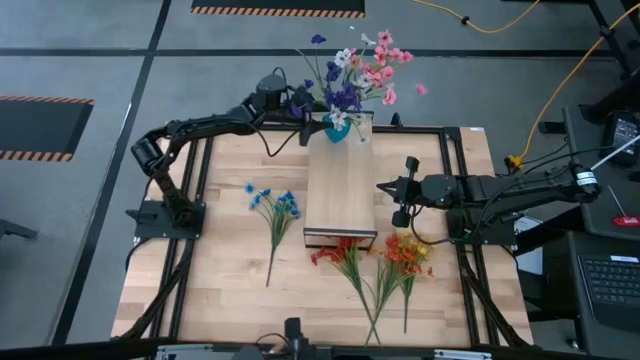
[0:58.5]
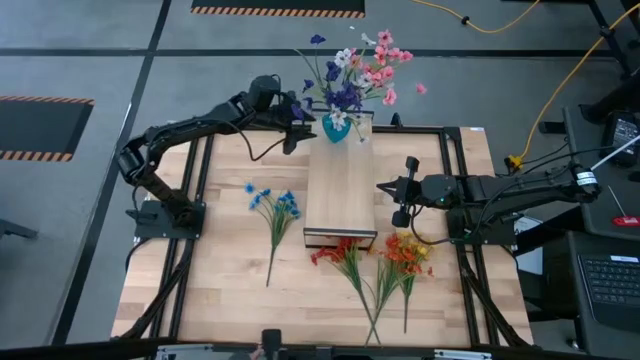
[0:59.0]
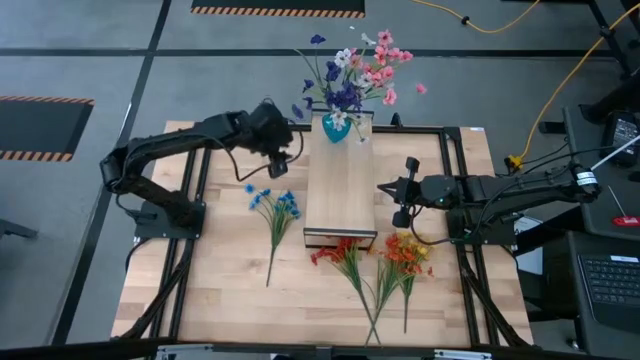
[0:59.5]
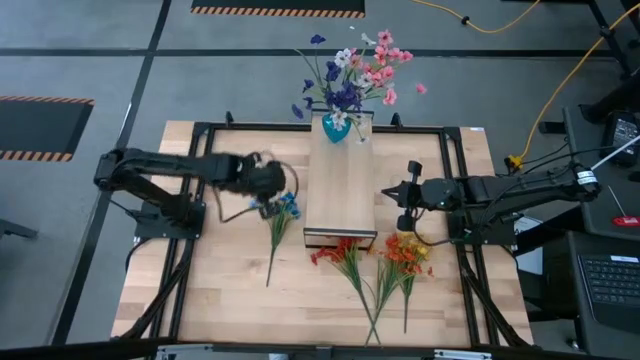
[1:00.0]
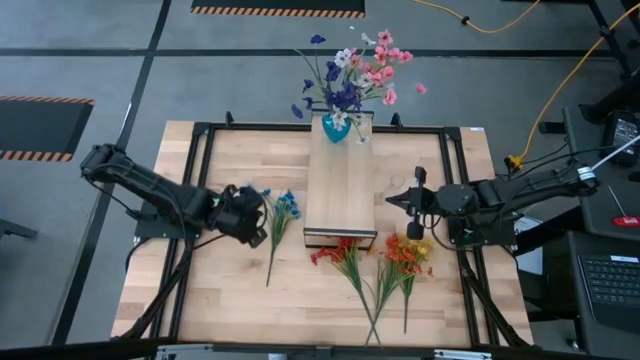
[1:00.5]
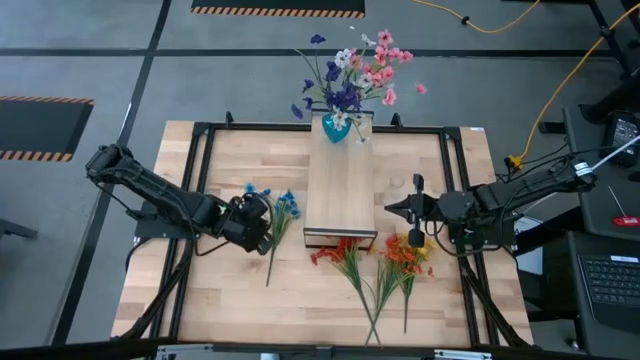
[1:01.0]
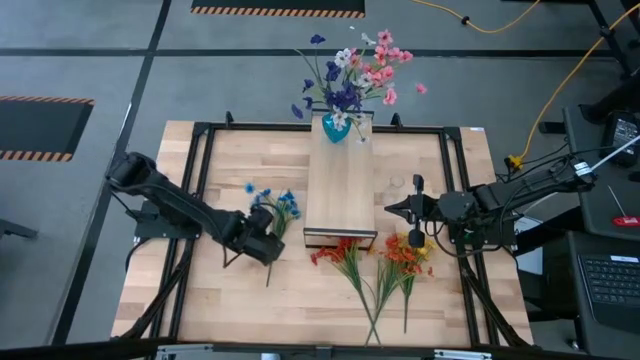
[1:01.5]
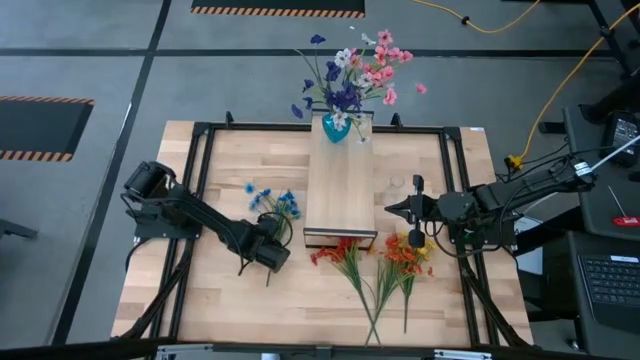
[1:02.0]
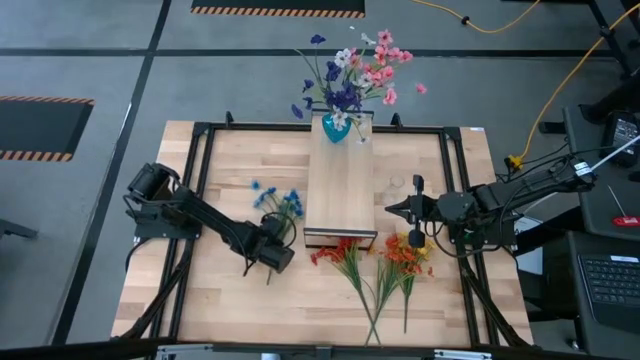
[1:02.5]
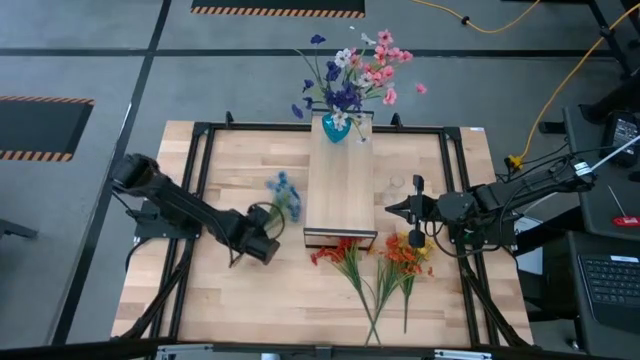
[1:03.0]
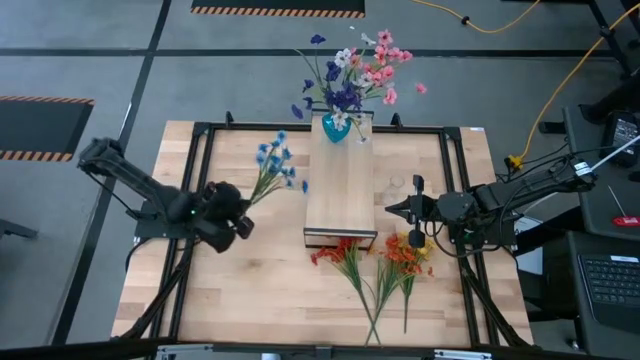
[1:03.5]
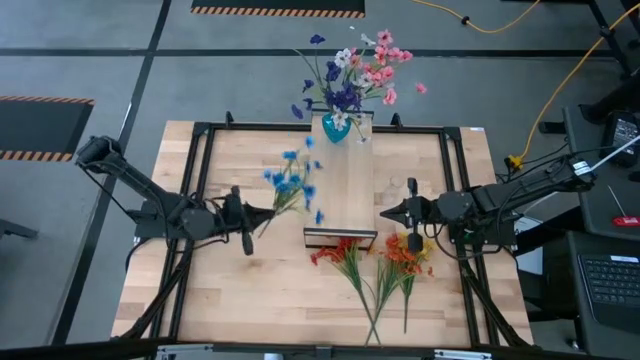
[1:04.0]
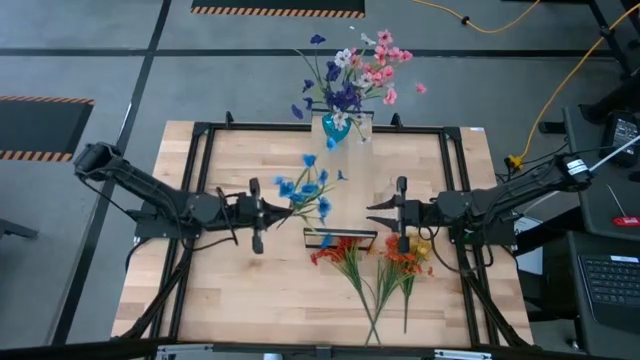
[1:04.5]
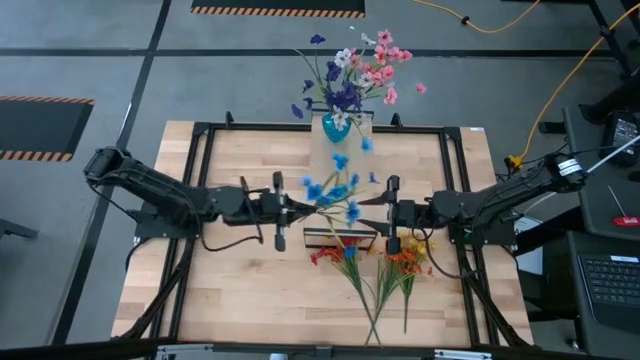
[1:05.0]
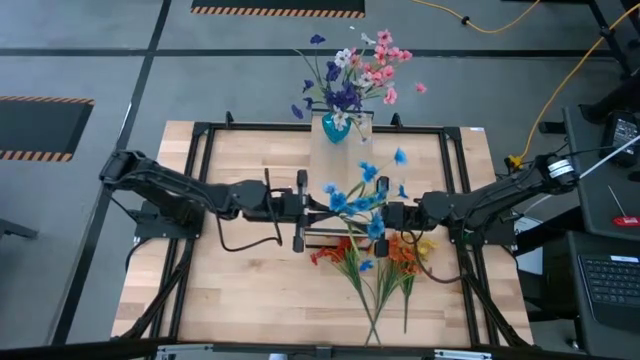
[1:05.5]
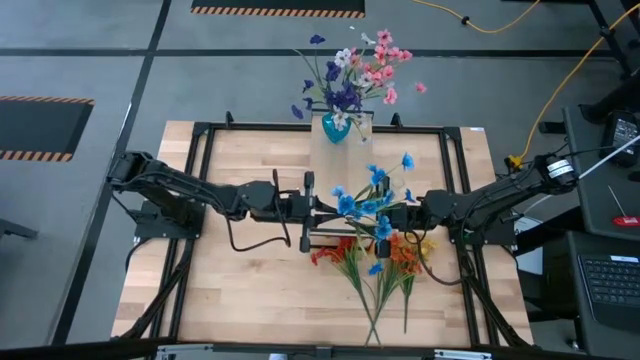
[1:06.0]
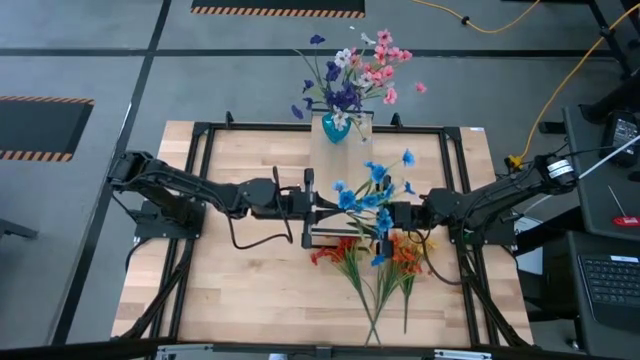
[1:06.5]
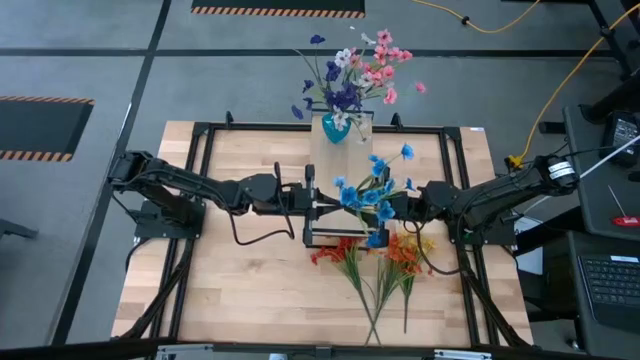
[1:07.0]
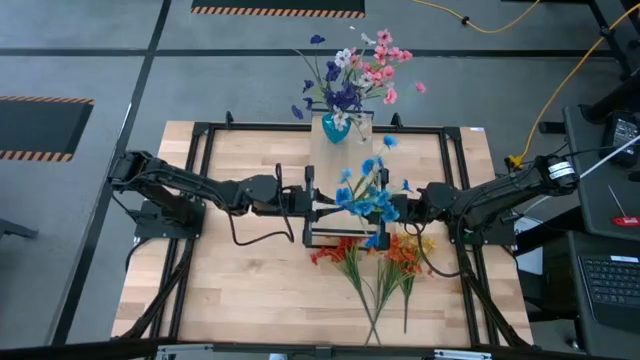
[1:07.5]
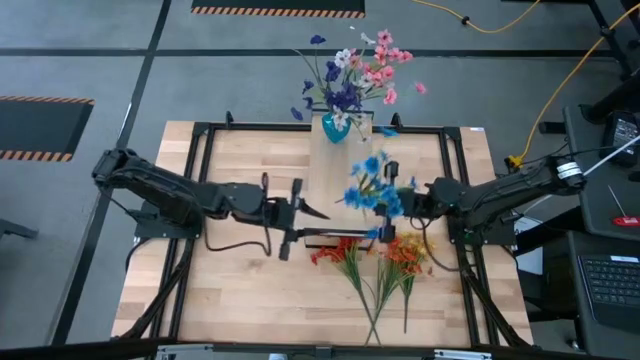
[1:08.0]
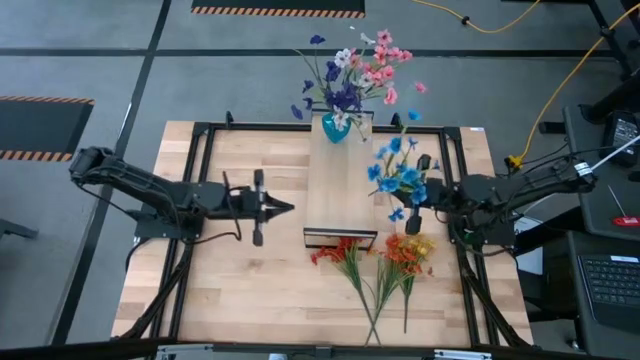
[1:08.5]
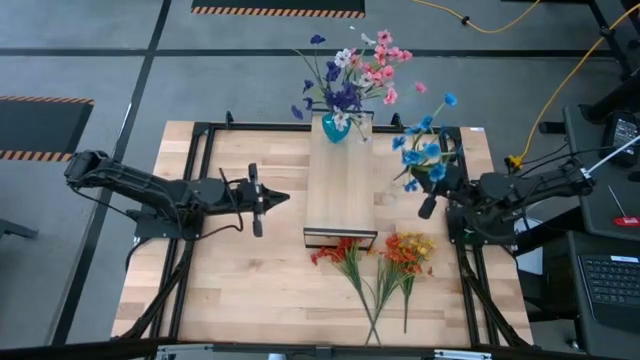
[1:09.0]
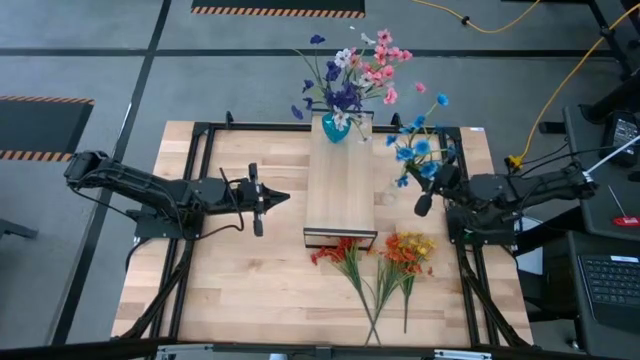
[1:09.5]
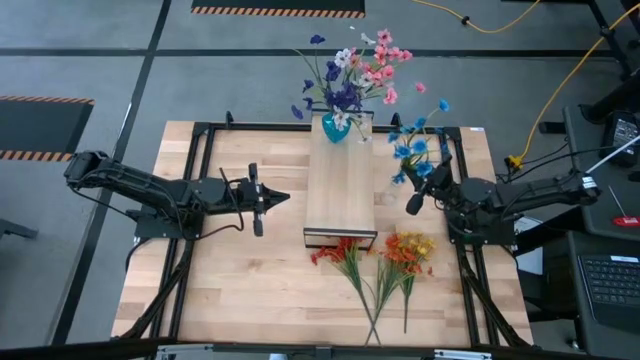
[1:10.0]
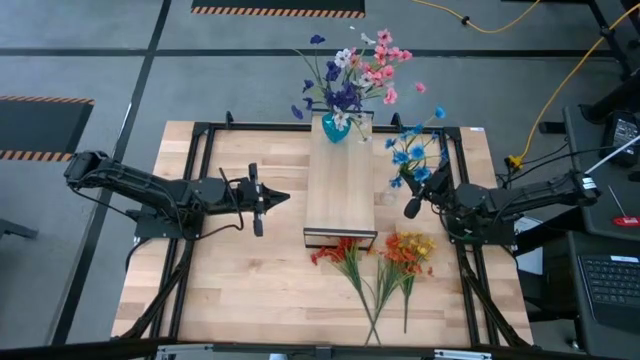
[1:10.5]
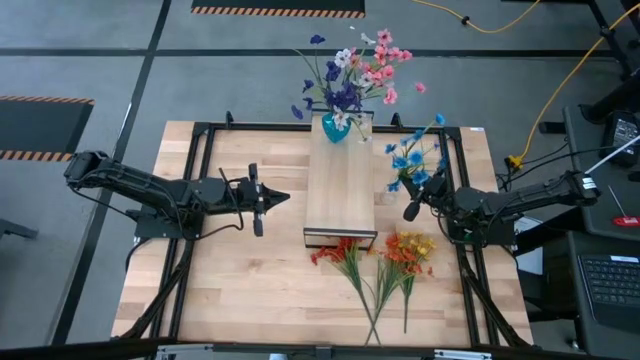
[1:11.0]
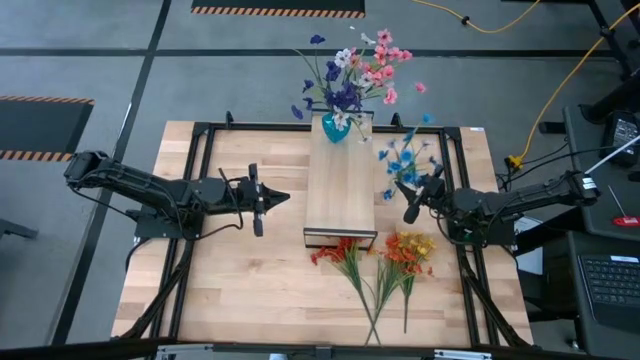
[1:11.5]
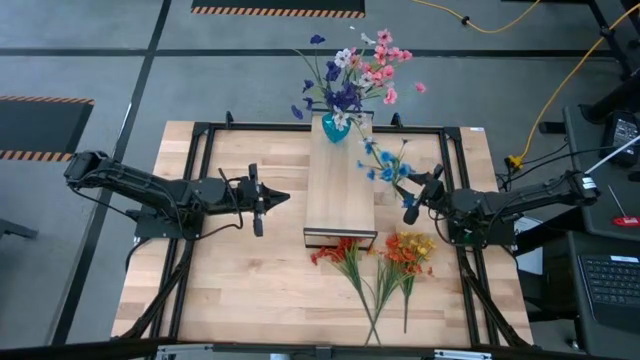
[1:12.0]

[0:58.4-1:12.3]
Task: Pick and place flowers into a vace then onto a shelf
Put the blue flowers into the transparent vase

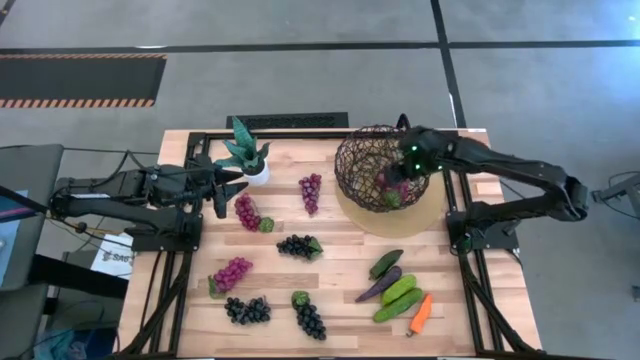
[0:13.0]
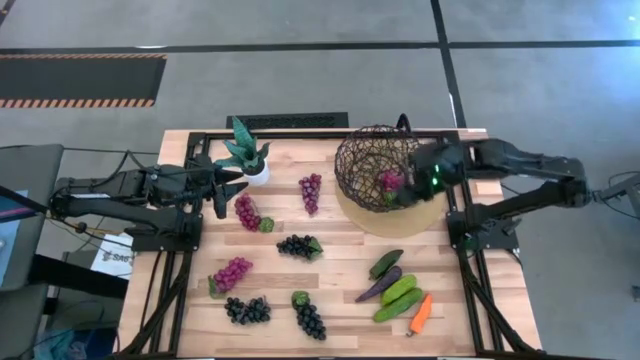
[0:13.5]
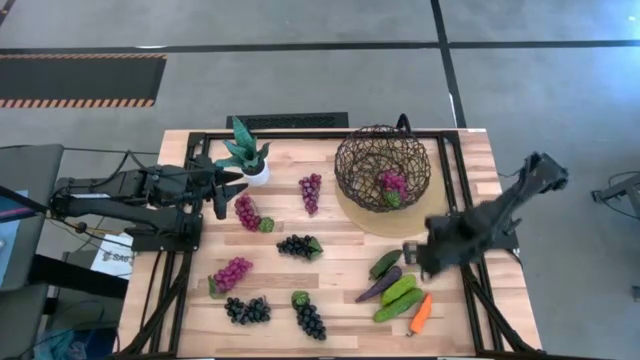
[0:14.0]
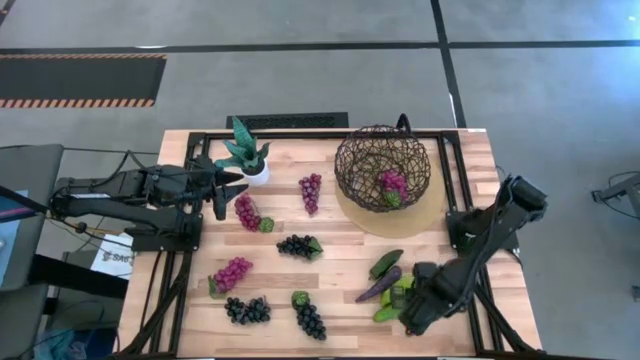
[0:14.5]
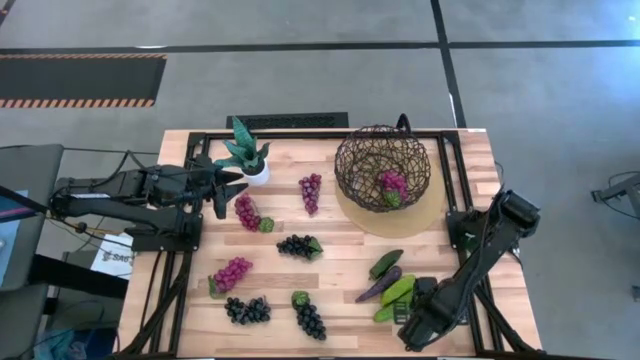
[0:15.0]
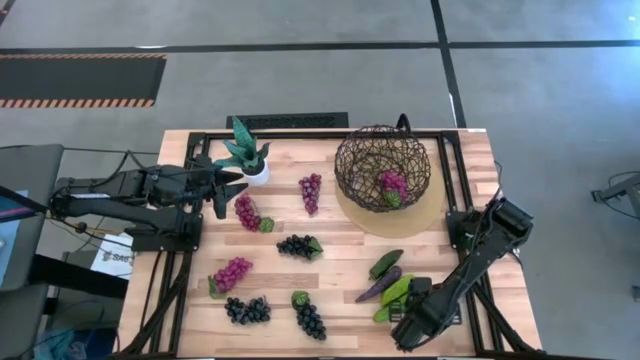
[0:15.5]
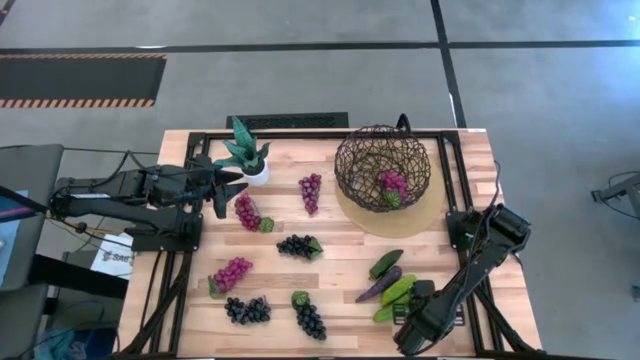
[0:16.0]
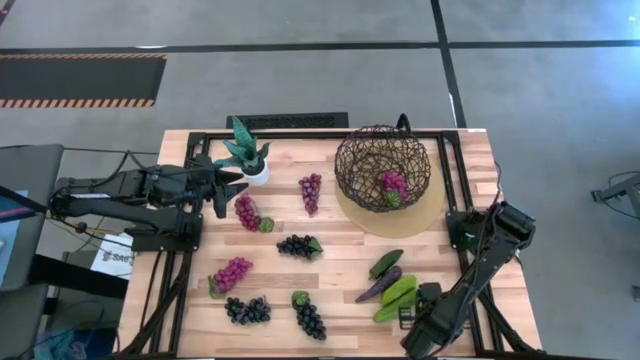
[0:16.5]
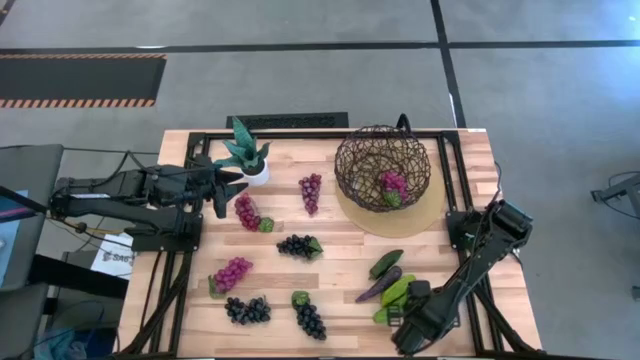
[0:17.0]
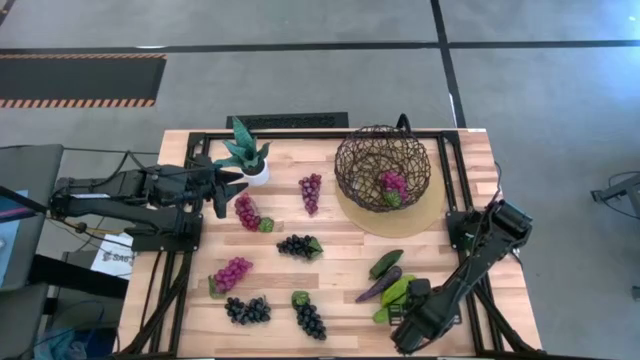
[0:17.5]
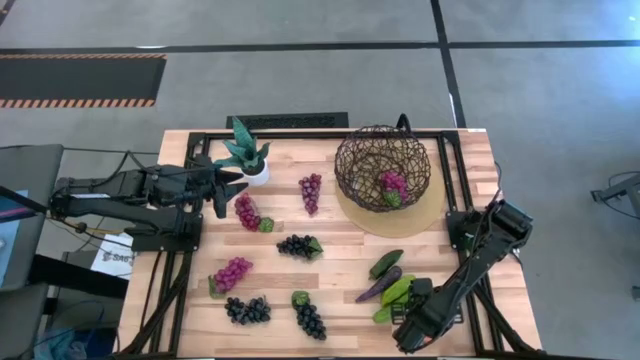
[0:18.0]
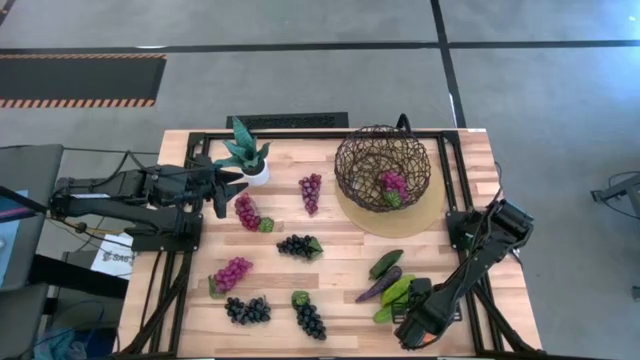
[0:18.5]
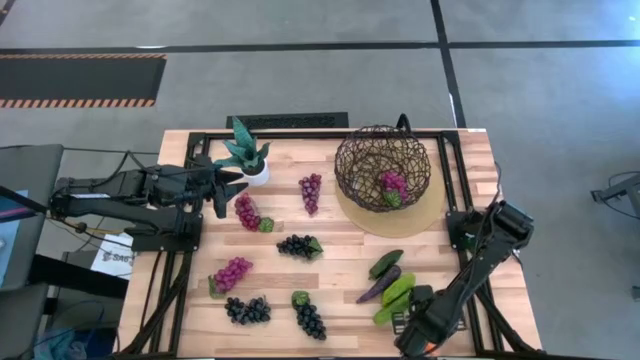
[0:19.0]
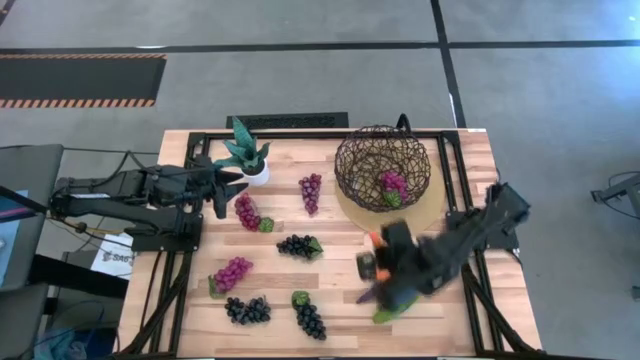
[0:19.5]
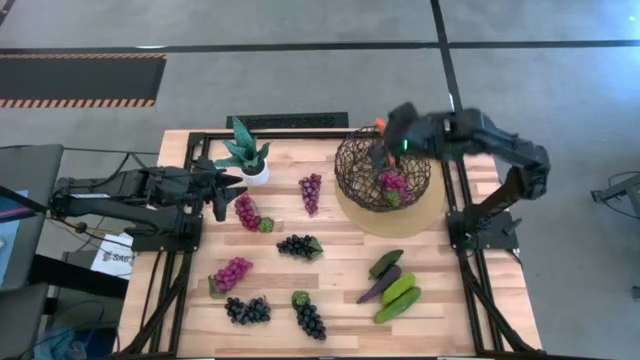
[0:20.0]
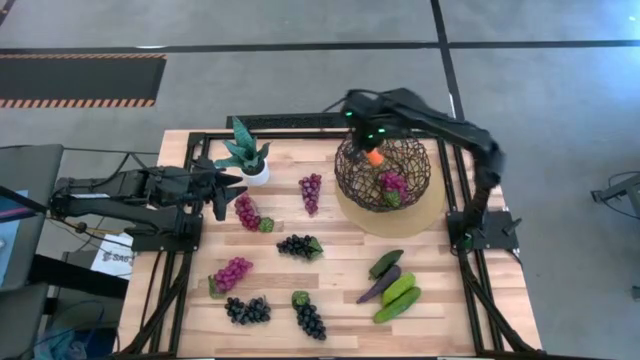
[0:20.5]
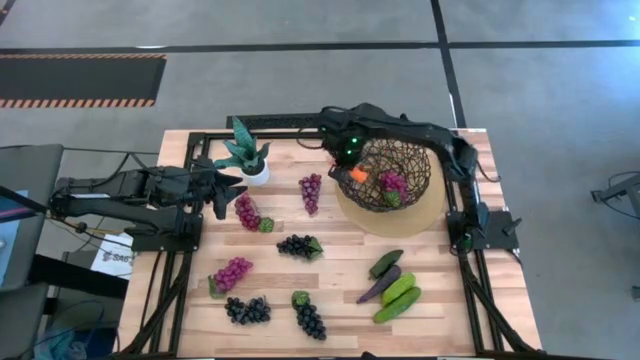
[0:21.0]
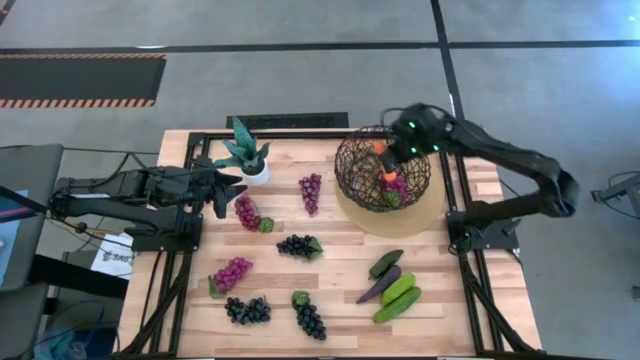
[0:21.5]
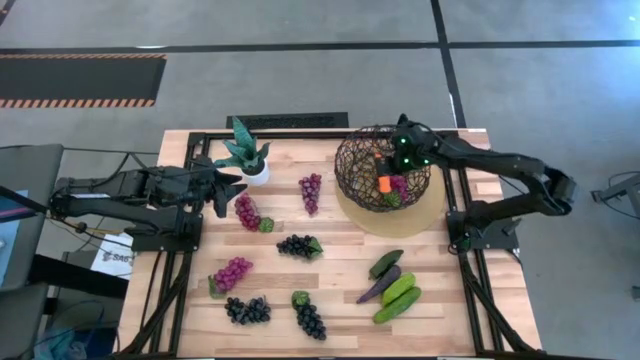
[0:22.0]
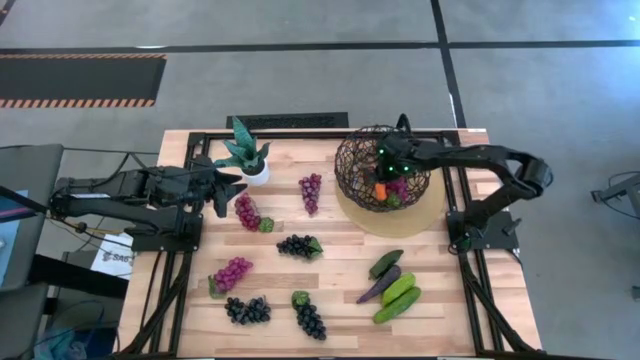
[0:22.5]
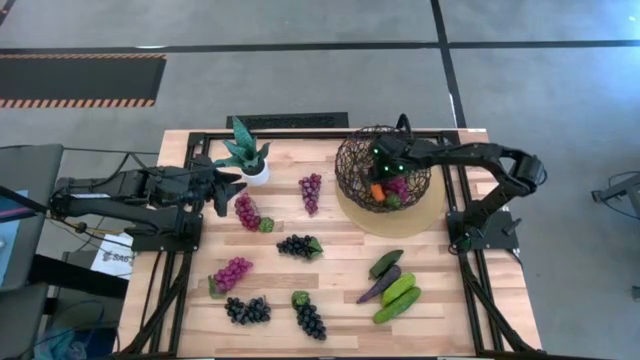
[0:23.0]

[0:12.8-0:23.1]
Task: Build produce basket
Put the orange chili pepper into the black wire basket
